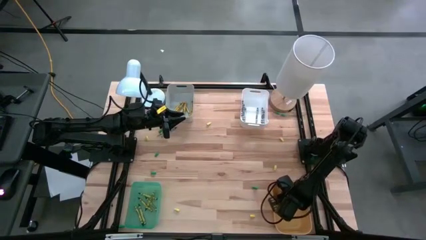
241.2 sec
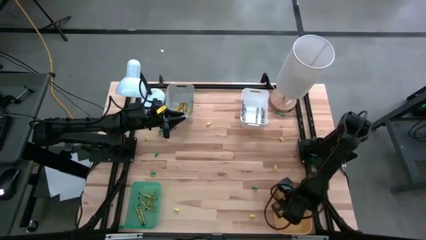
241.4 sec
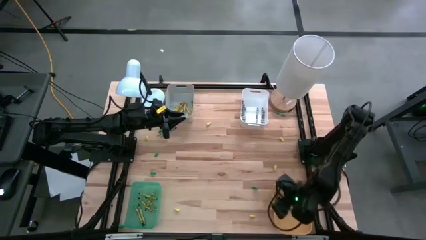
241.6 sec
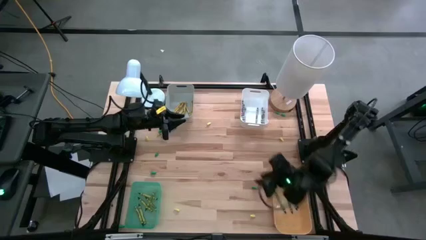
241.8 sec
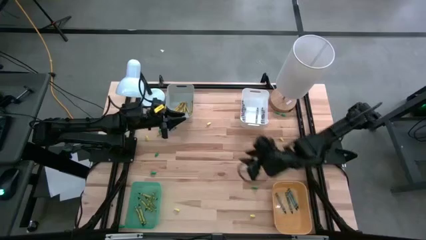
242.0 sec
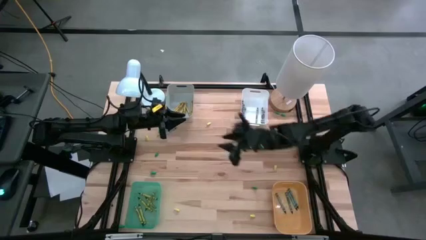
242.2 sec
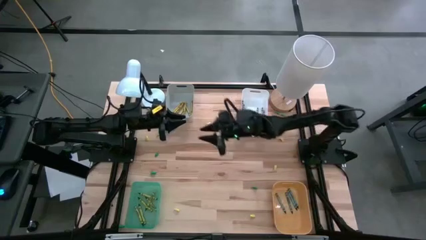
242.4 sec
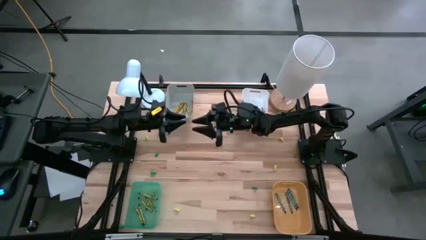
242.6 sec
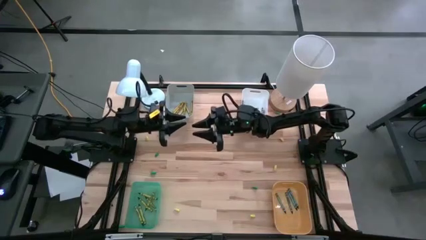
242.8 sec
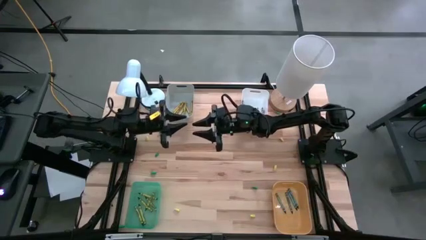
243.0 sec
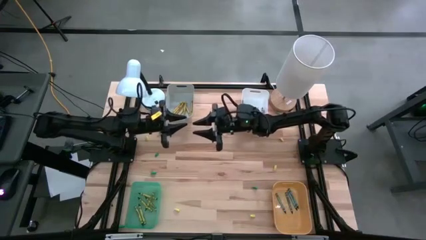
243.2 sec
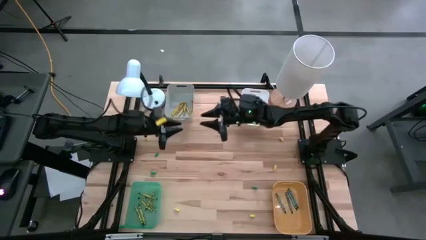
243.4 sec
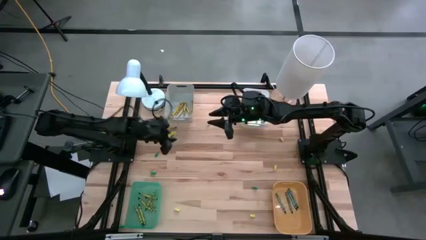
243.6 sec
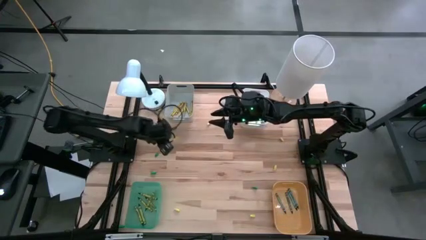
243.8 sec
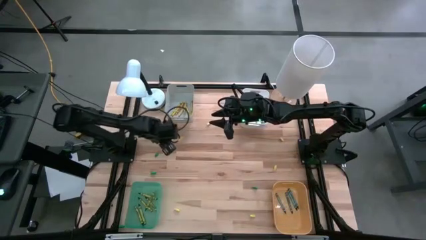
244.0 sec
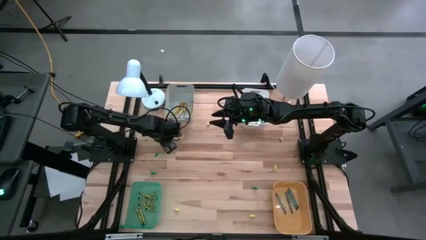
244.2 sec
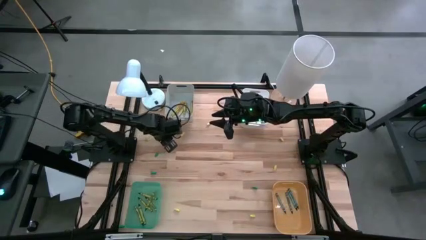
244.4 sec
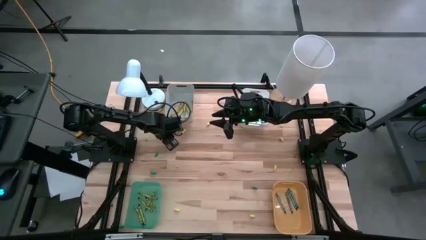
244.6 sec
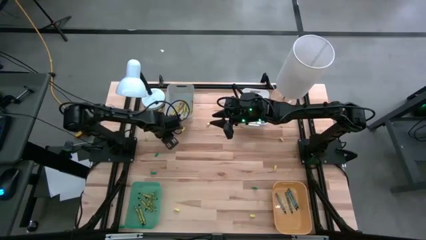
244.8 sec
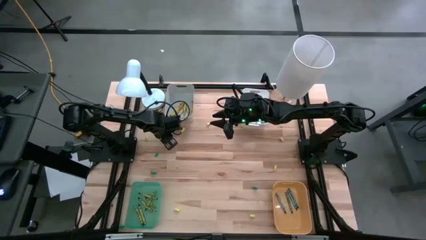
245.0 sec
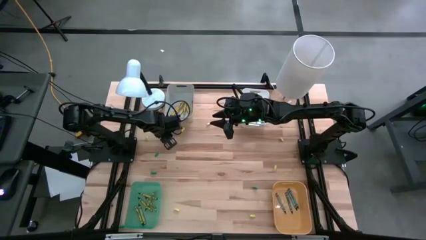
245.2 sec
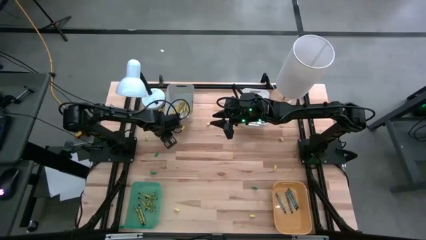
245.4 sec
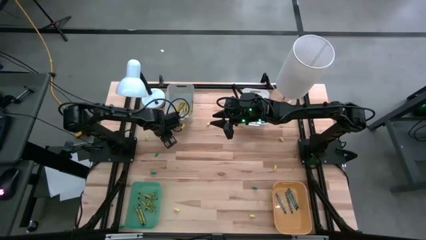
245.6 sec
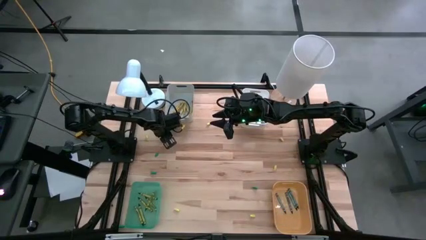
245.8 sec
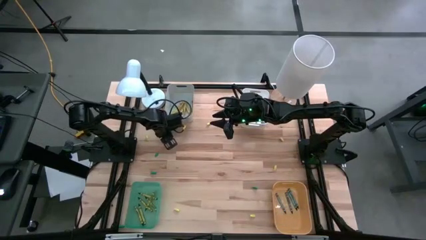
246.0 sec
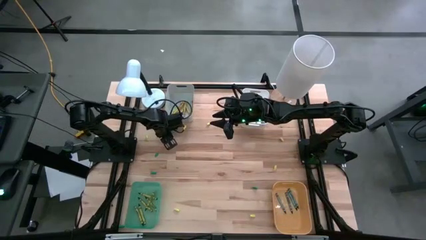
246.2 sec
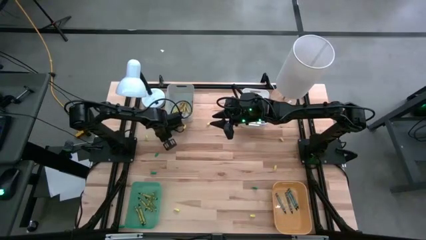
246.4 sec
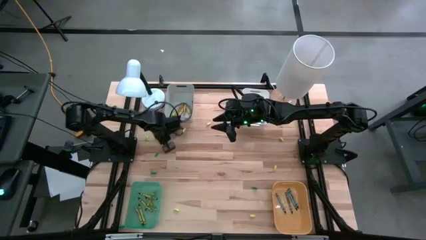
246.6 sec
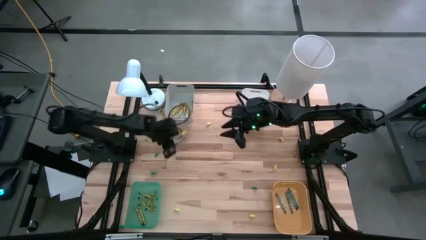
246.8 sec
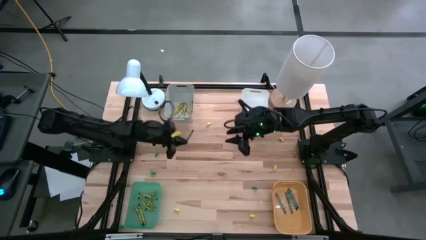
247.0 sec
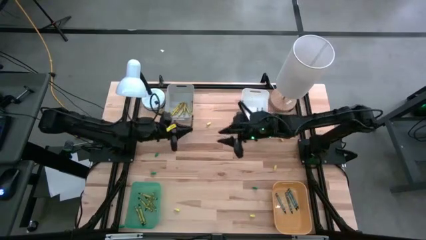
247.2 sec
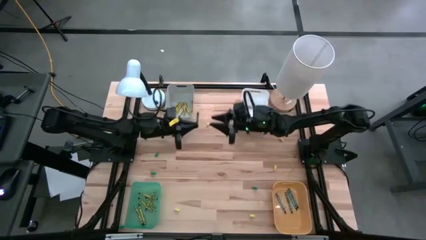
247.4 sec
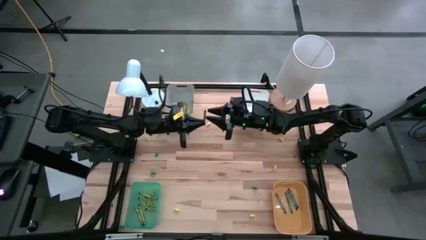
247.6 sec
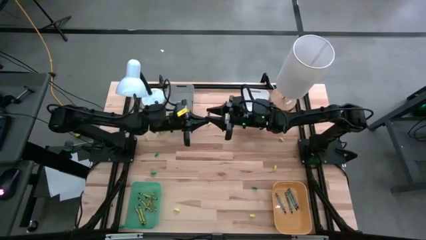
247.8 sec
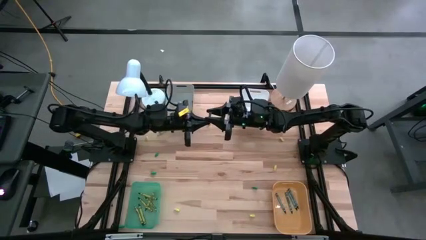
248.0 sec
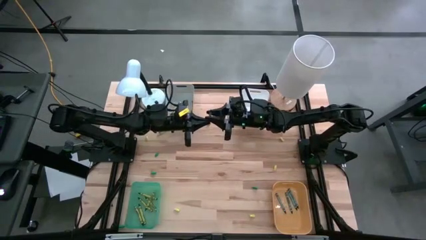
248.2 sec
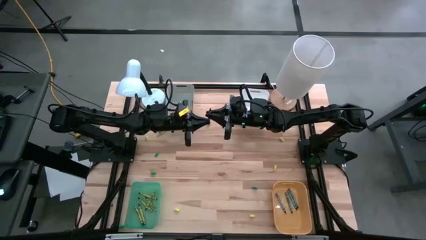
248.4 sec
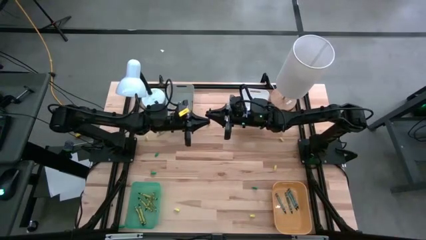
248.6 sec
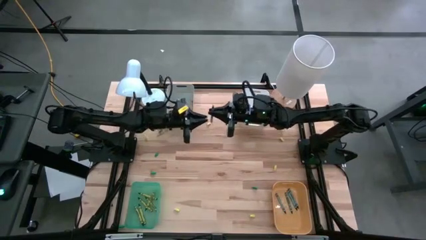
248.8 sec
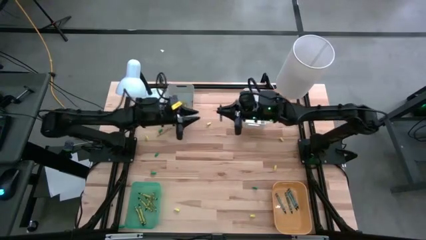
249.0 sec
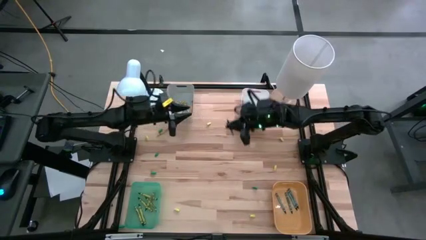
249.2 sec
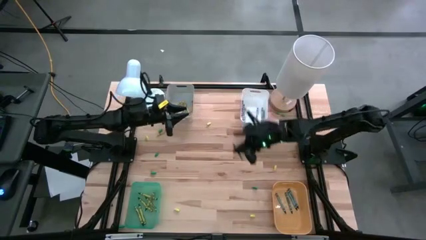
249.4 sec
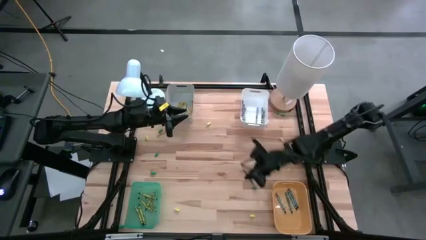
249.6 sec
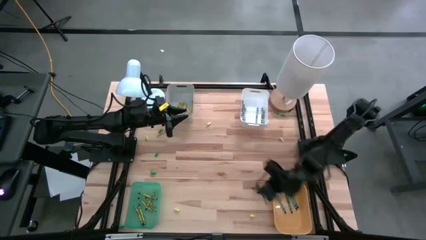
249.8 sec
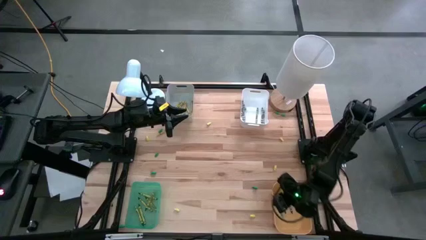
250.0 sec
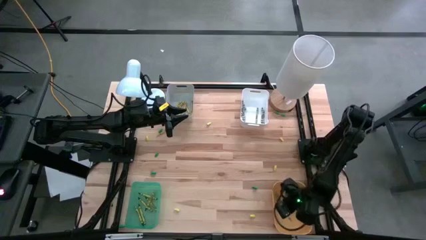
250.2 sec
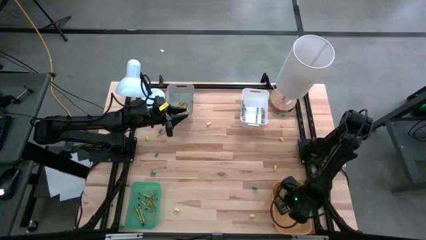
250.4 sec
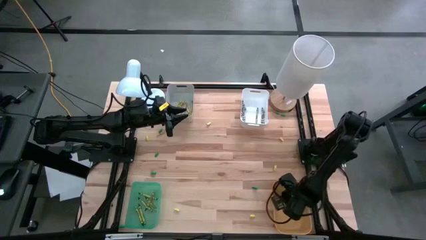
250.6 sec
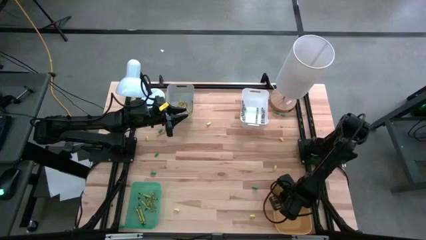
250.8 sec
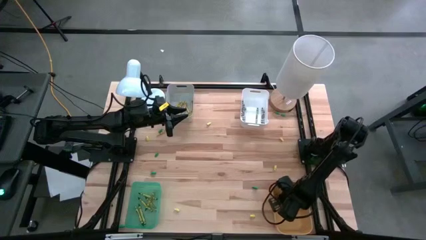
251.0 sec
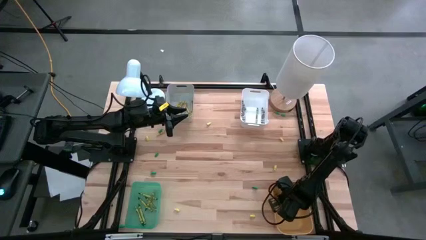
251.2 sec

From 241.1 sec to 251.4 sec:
Task: Sort crayons
Put the blue crayon into the yellow bin

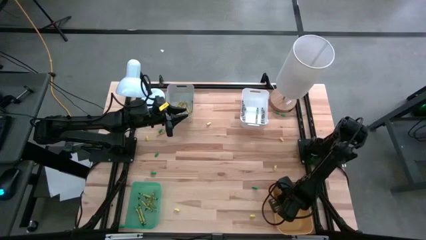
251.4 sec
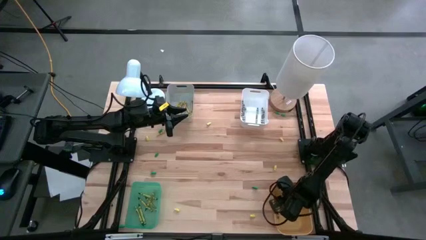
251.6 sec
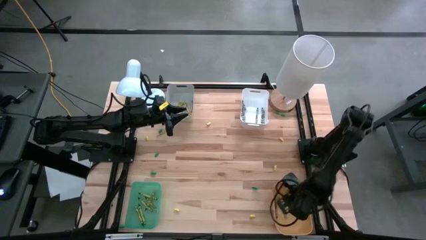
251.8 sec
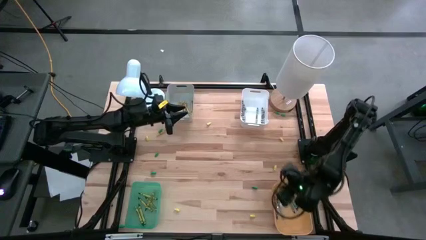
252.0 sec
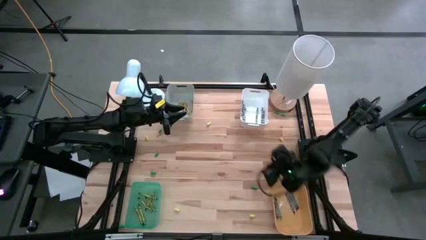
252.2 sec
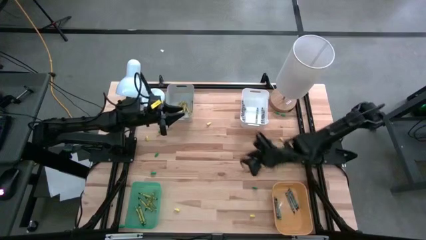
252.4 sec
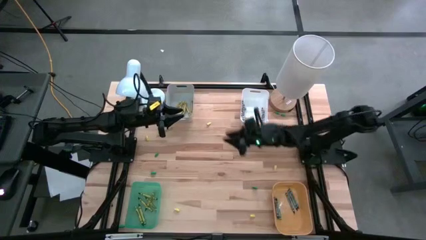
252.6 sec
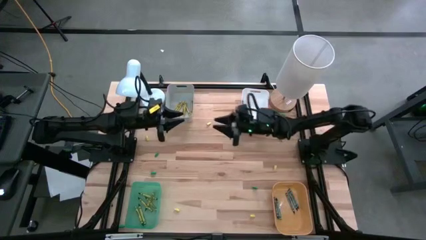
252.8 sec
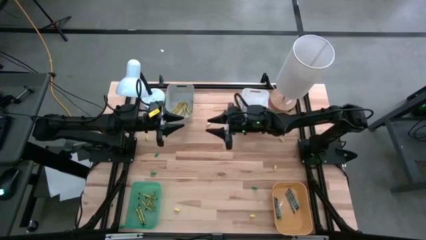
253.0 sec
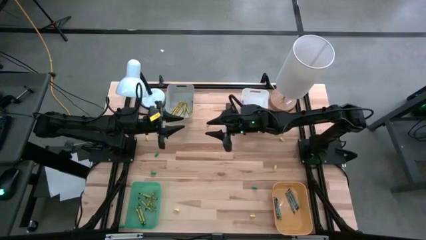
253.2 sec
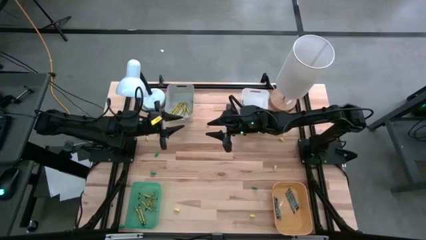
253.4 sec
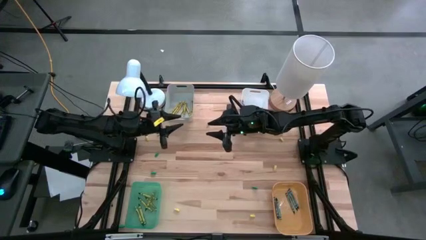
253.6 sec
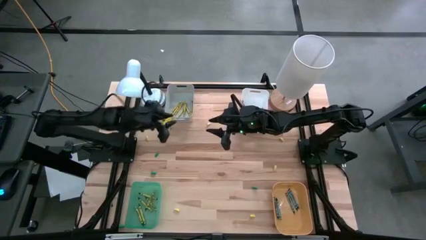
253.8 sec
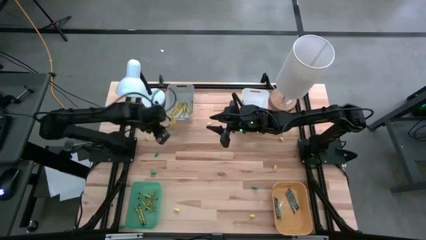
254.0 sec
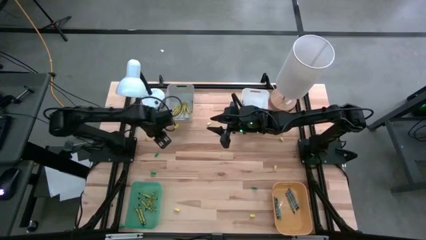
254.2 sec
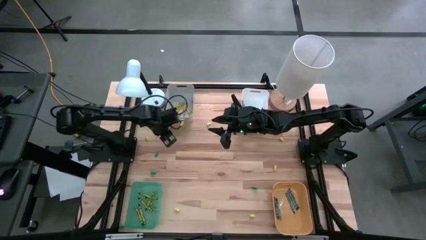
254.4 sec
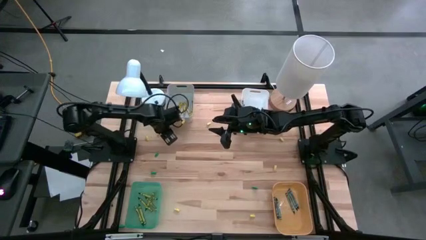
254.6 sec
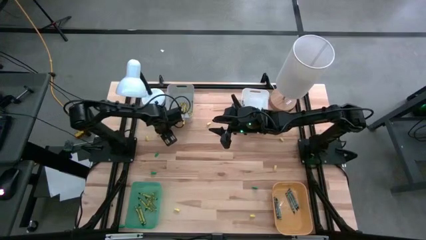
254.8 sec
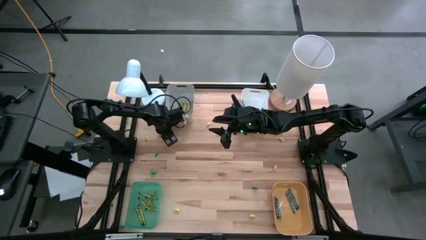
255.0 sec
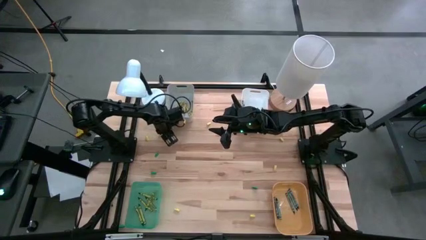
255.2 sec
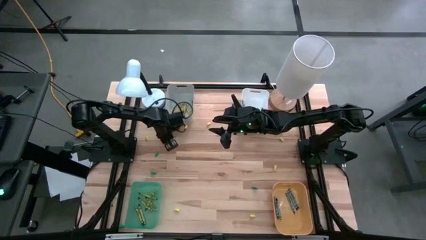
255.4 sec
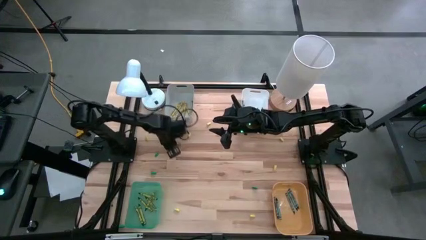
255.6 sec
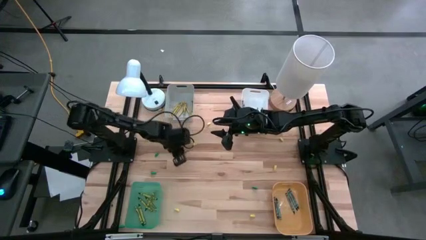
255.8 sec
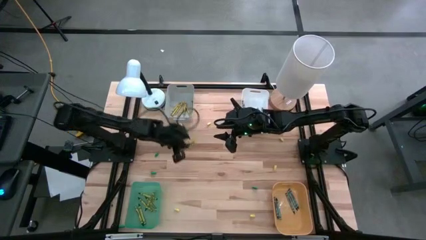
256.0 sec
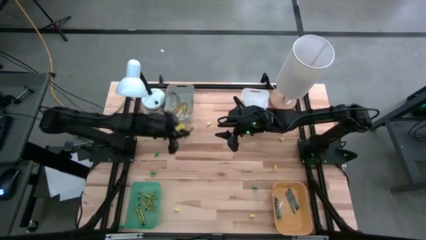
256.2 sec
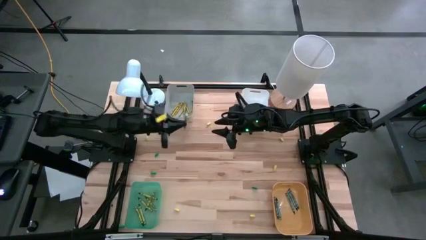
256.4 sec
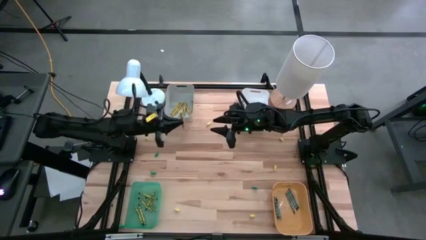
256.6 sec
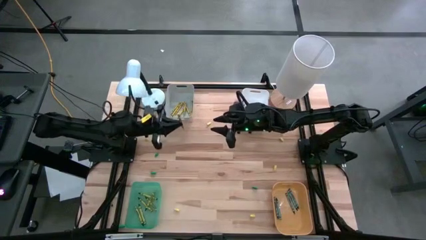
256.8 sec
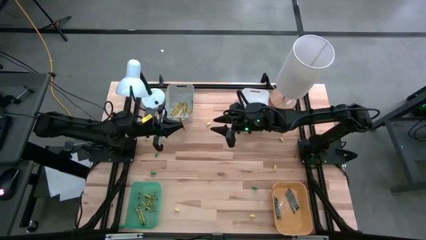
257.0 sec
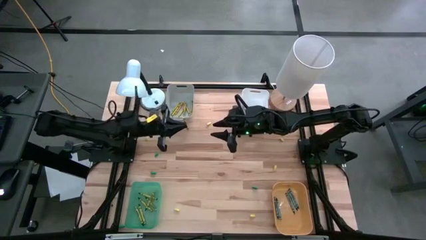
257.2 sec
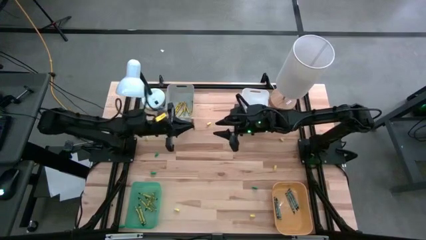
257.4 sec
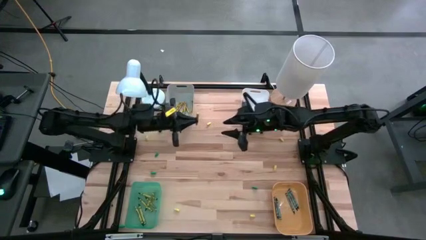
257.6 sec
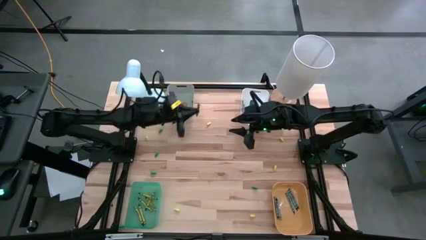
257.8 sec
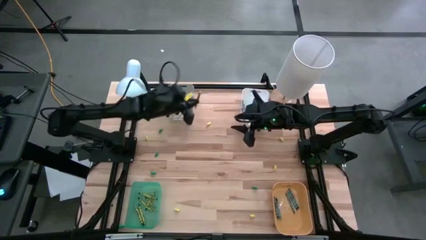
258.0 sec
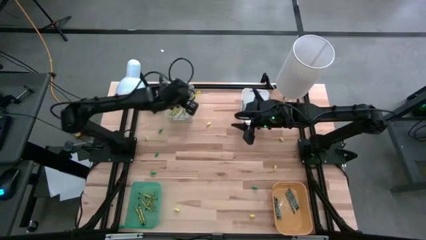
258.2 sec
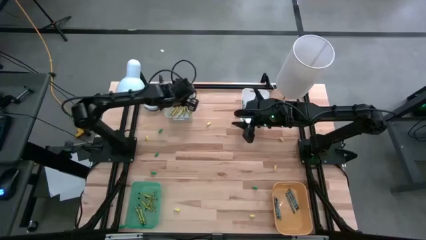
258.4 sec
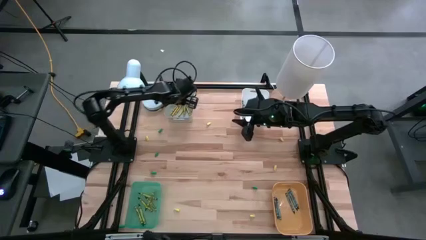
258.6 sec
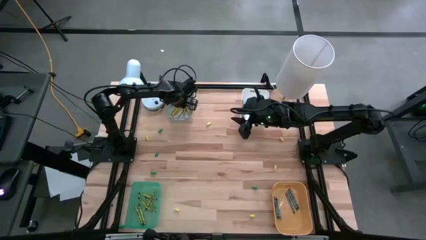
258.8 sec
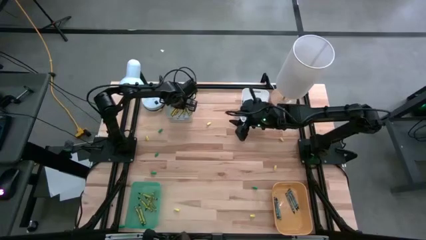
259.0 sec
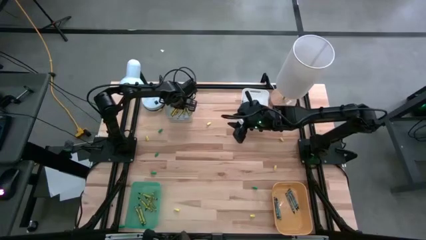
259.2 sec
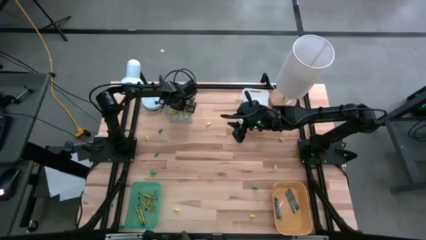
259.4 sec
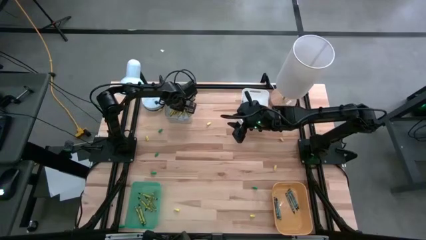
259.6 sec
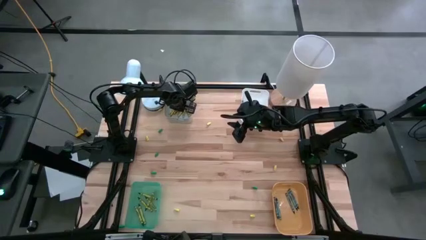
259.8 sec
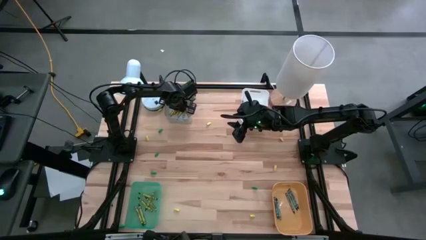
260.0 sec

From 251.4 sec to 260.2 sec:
Put the yellow crayon into the gray bin
